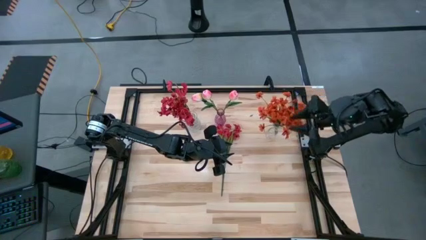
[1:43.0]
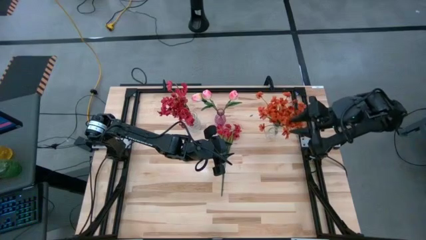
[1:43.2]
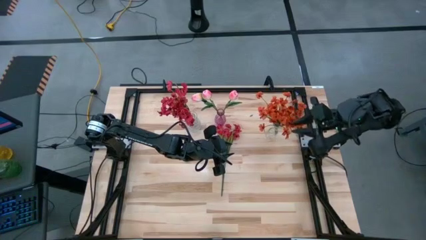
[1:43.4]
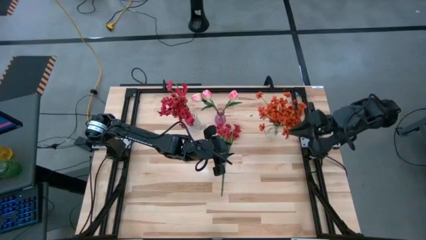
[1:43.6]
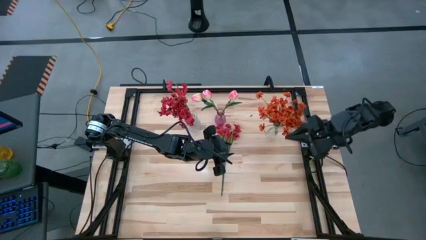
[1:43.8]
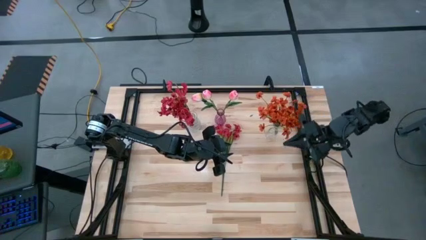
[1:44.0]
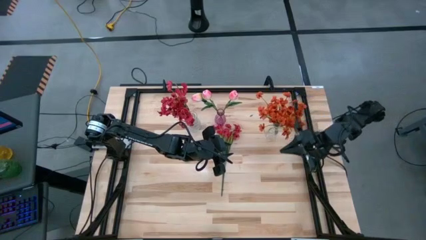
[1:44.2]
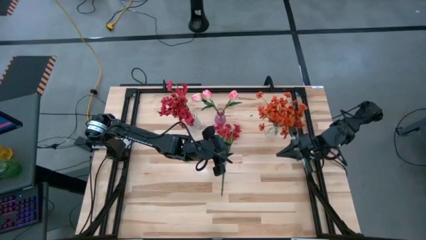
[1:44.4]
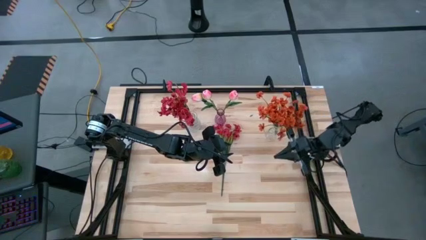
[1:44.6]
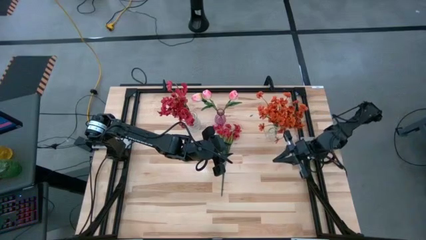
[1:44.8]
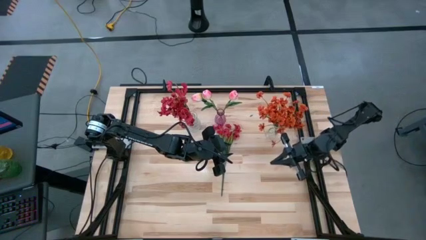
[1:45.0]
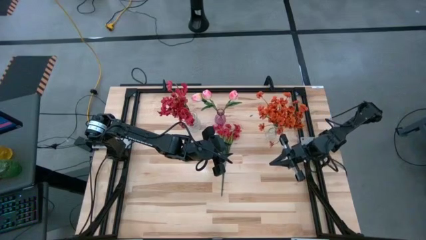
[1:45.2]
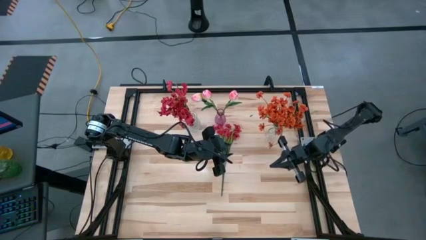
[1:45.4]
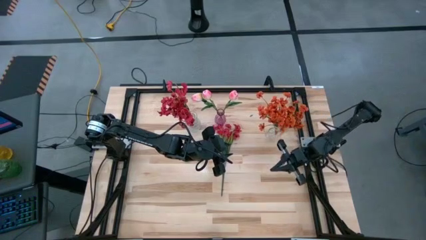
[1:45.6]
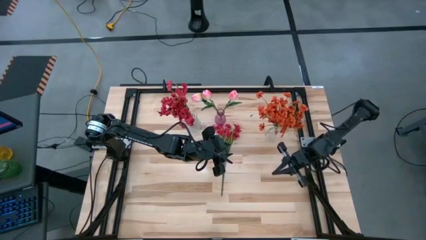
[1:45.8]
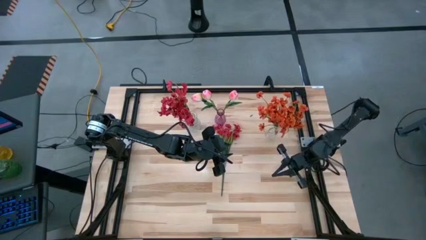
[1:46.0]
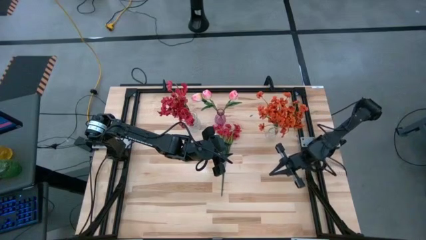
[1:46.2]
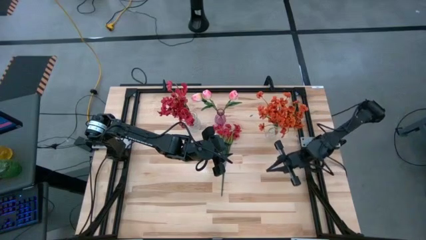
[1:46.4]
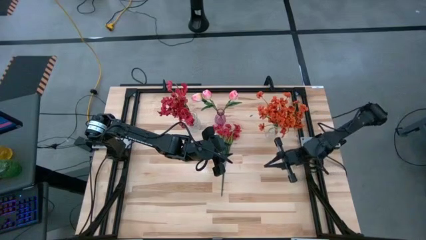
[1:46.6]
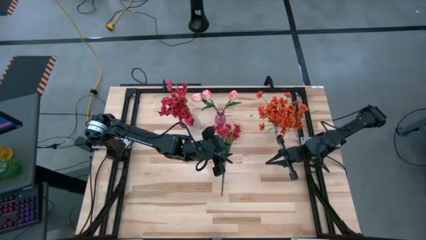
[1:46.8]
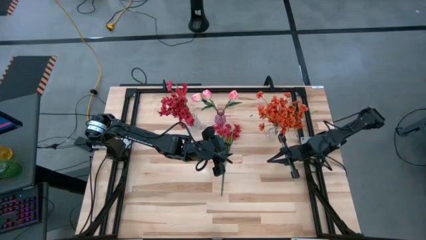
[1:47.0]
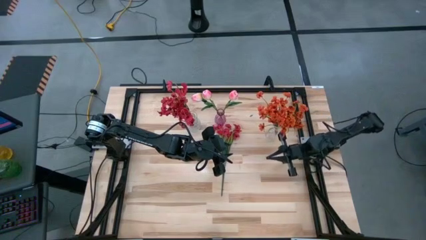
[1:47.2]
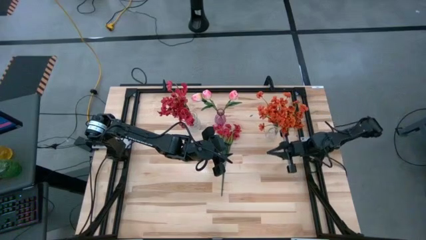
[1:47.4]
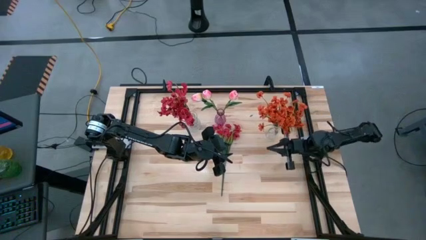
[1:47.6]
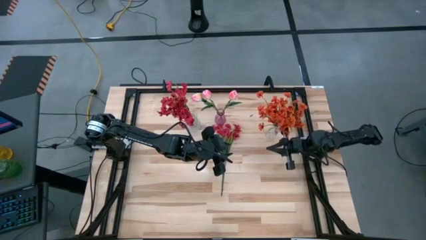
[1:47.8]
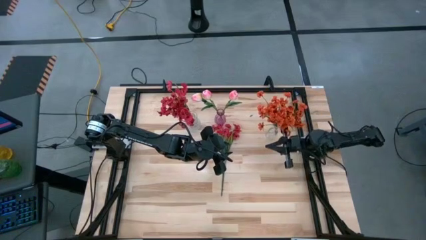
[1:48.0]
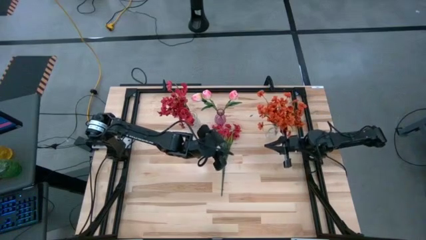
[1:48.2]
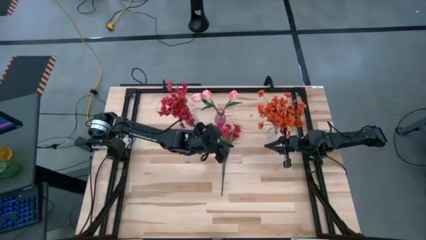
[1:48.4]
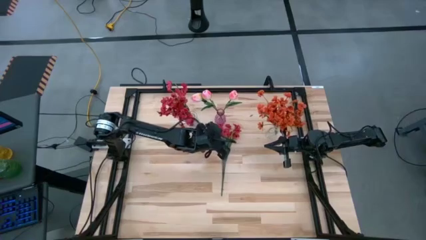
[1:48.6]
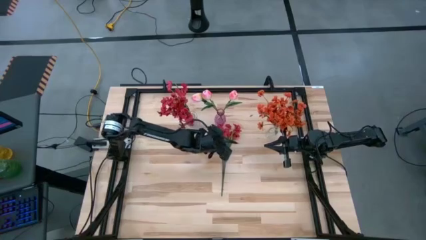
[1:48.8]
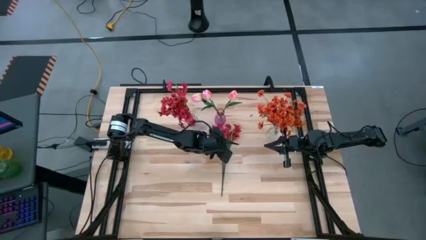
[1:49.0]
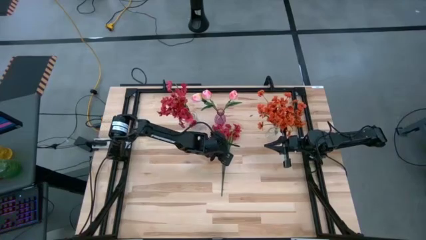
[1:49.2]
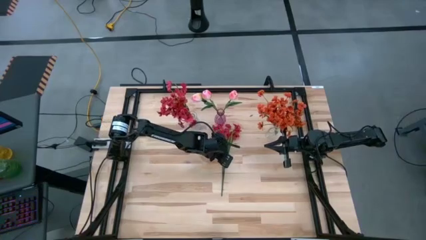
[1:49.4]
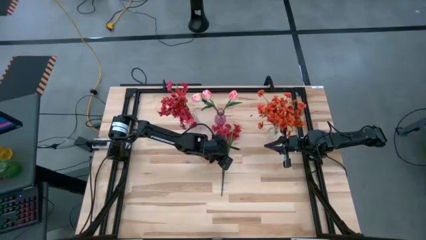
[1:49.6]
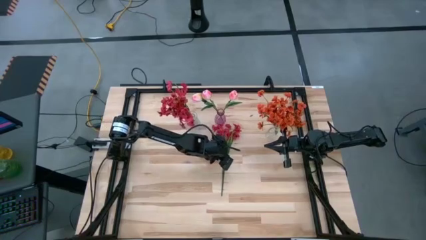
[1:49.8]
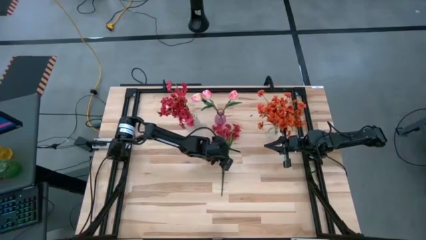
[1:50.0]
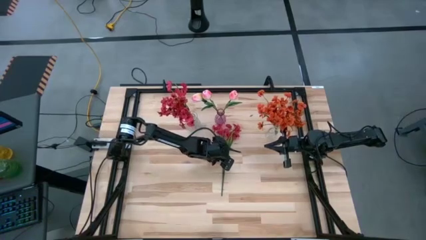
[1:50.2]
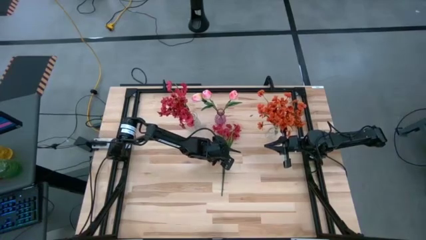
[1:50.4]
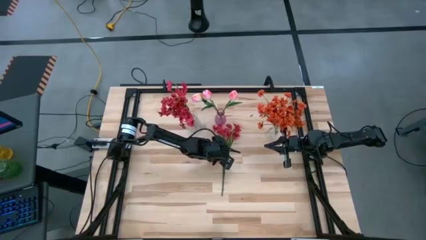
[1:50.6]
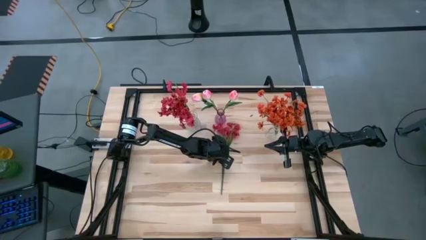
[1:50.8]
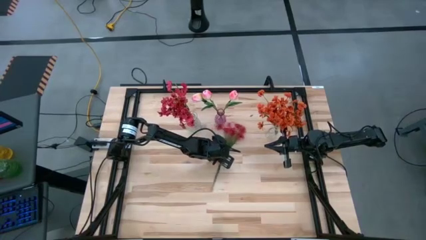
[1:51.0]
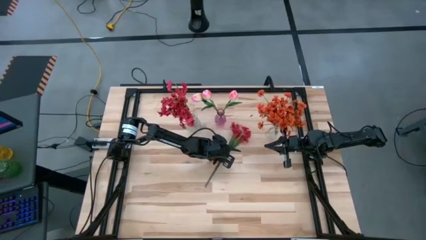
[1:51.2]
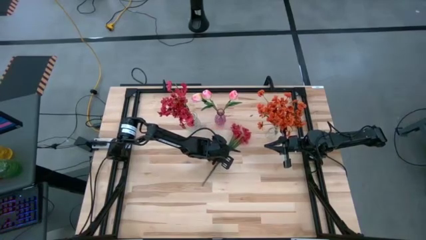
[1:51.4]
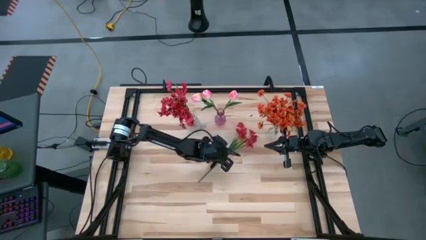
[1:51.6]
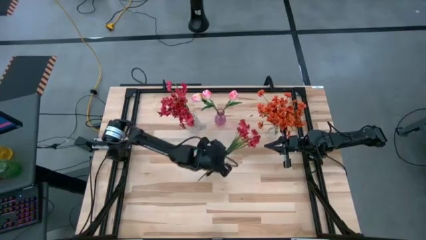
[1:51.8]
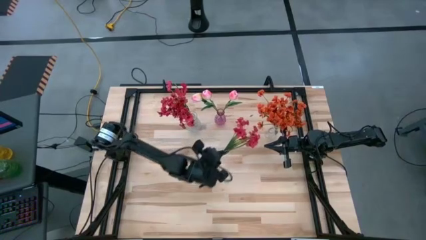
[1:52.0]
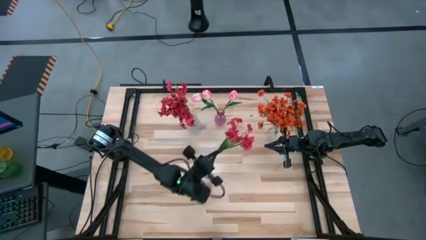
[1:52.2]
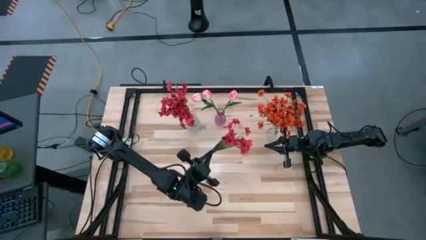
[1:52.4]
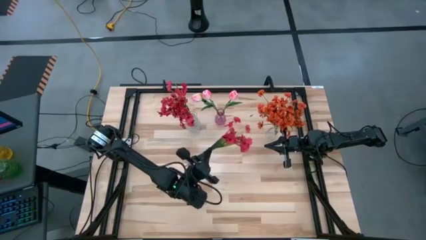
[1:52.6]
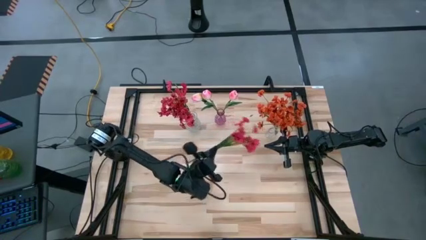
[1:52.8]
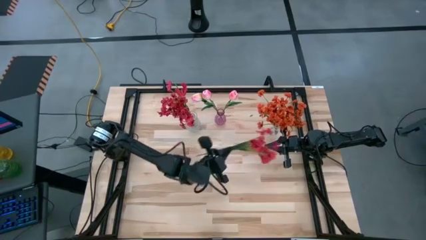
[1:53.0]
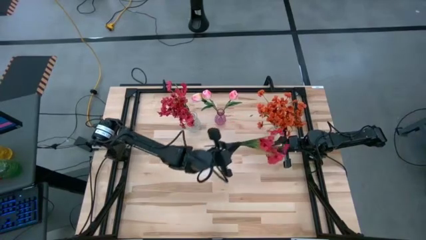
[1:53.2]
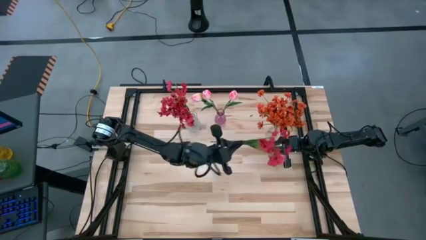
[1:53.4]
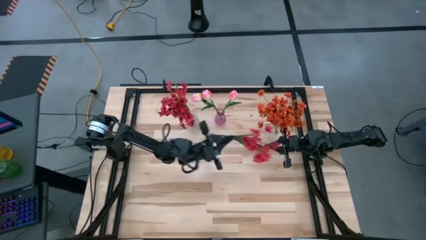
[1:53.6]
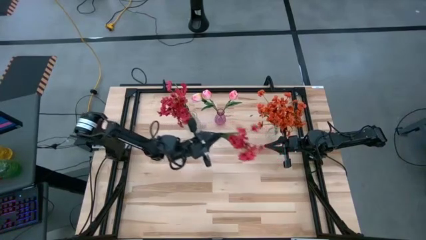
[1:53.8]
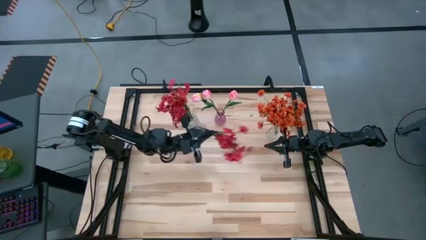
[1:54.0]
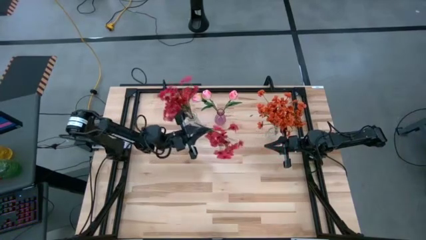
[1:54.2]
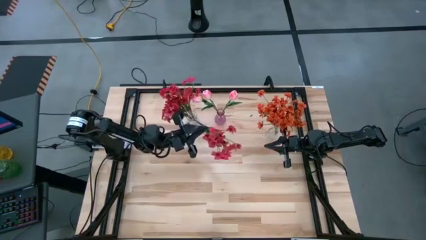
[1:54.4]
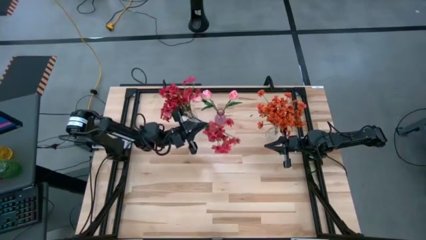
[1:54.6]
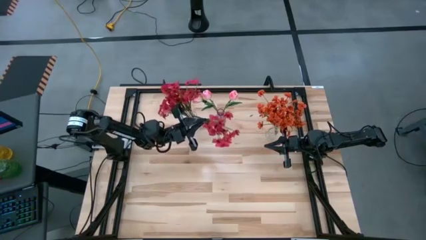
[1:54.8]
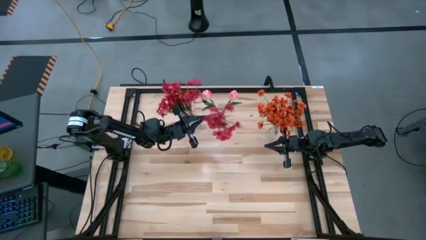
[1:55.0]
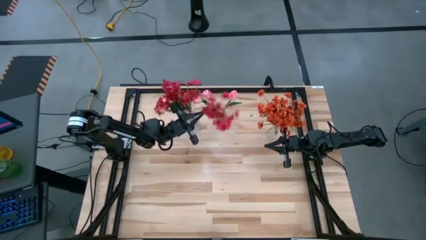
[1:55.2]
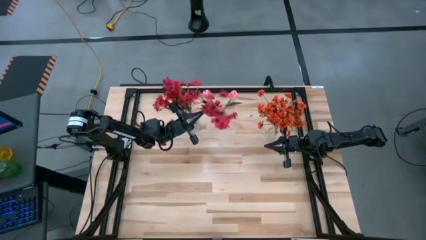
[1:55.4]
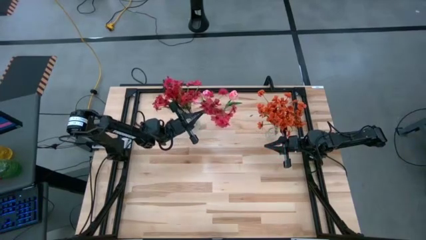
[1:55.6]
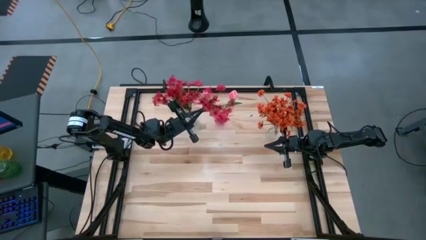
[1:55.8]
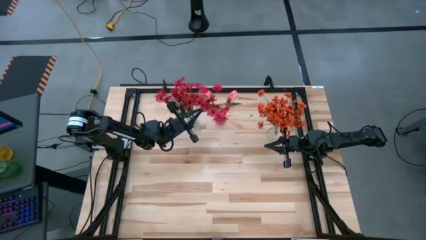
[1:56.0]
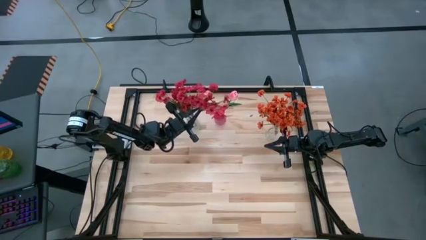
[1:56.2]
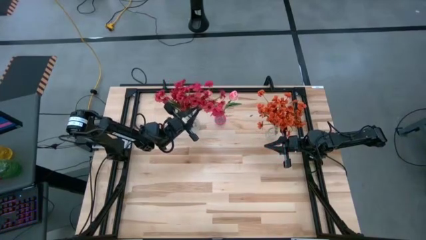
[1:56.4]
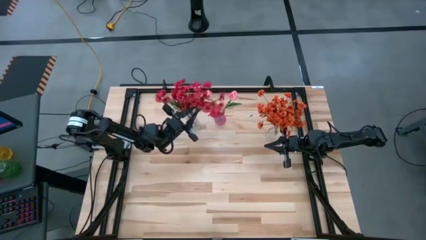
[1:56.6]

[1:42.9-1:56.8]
Task: Sort flowers into vase by color
Put the red flowers into the left transparent vase

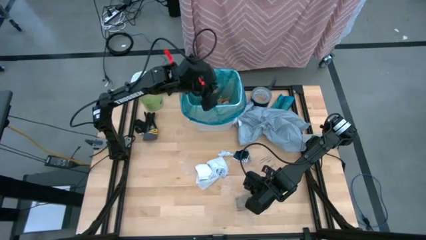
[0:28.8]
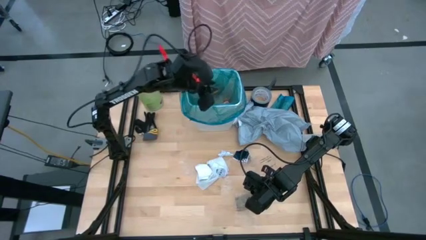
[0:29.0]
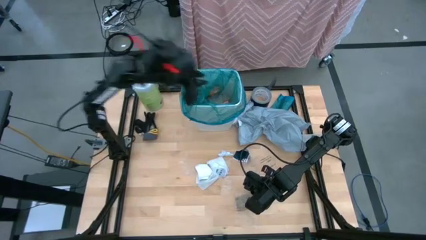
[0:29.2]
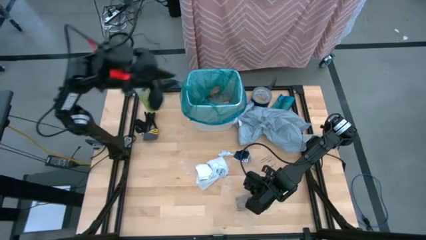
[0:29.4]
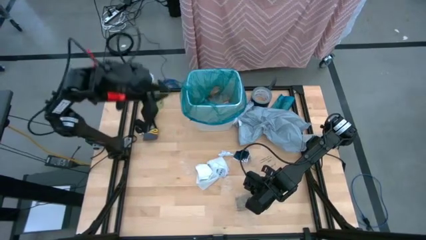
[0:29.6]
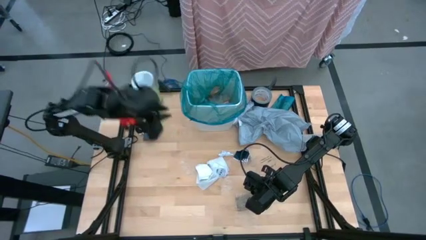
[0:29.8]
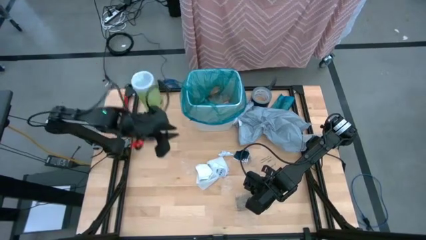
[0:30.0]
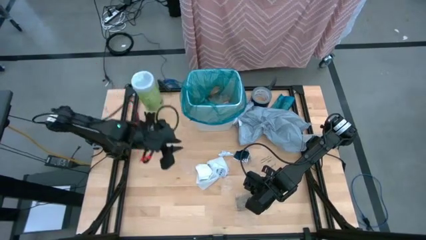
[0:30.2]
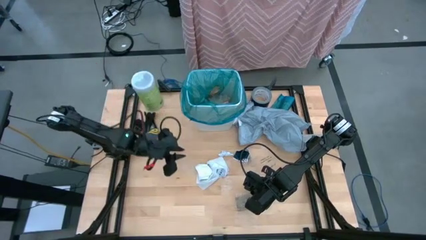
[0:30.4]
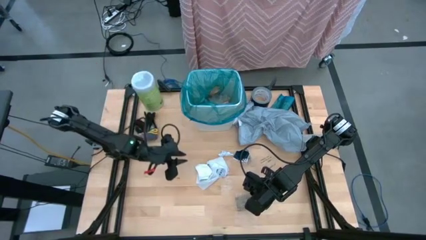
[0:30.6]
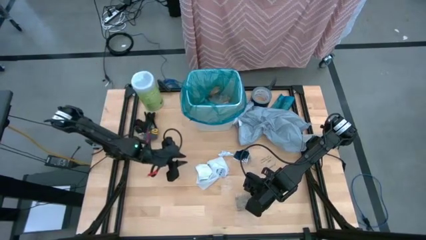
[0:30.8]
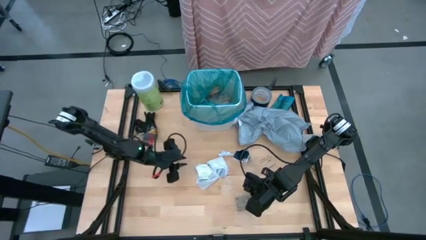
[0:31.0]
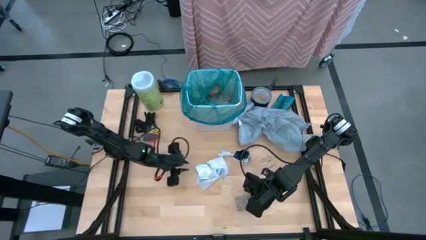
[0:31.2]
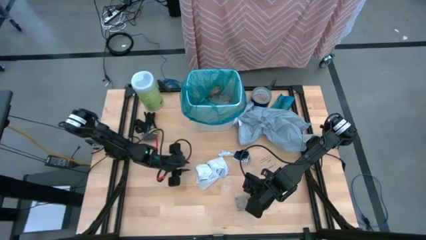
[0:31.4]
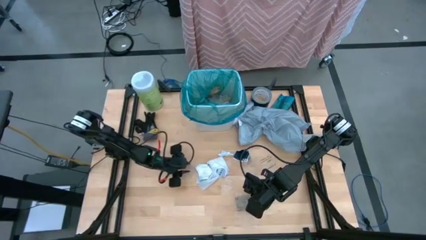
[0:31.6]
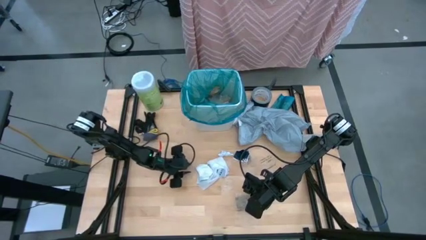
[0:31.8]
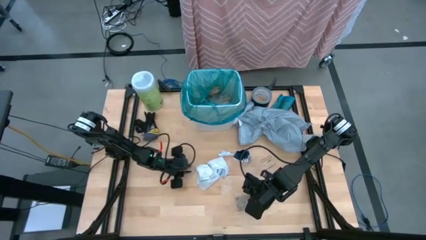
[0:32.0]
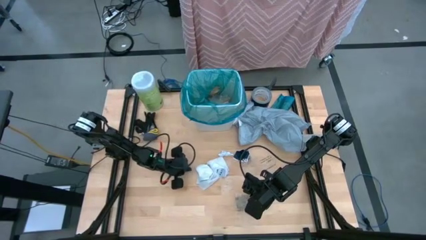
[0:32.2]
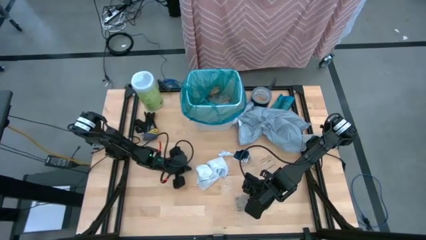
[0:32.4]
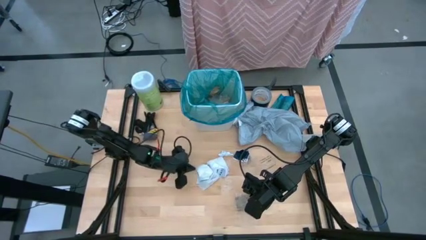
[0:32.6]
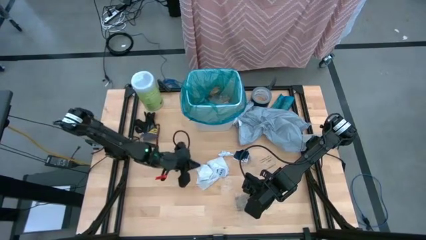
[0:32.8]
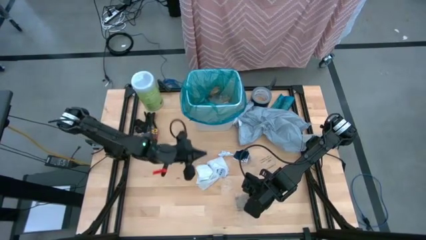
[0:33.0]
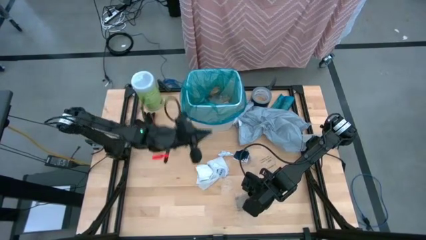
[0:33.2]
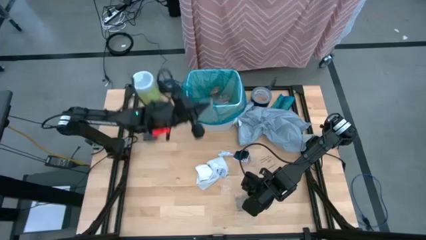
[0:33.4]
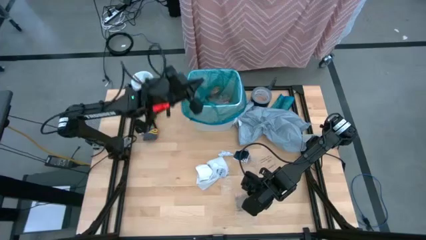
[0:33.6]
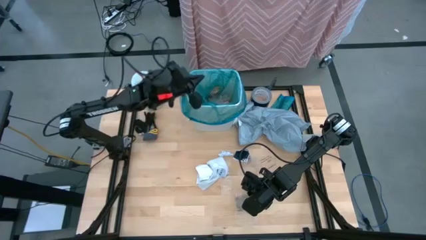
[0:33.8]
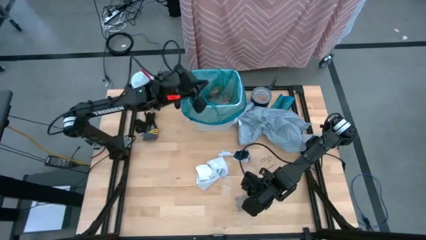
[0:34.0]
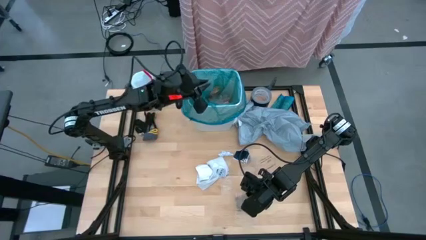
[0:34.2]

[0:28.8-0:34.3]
Task: place trash/remove bag and relplace
Put the transparent plastic material into the trash bin
